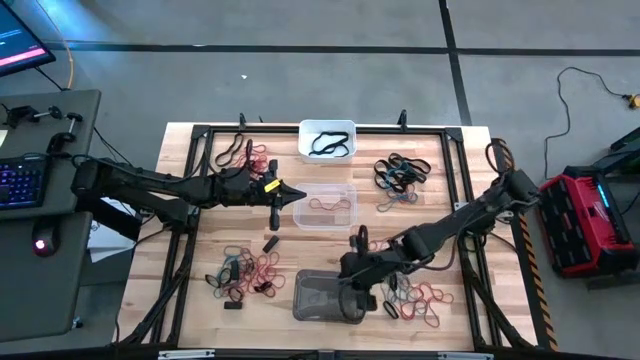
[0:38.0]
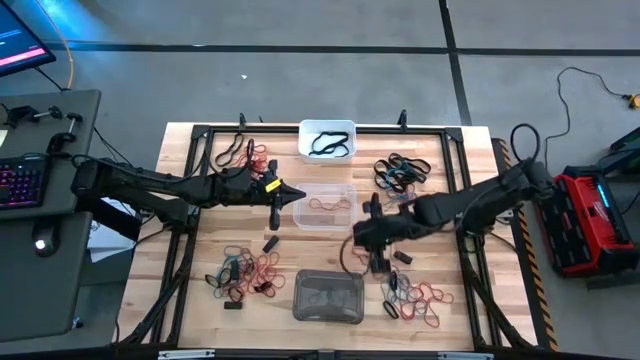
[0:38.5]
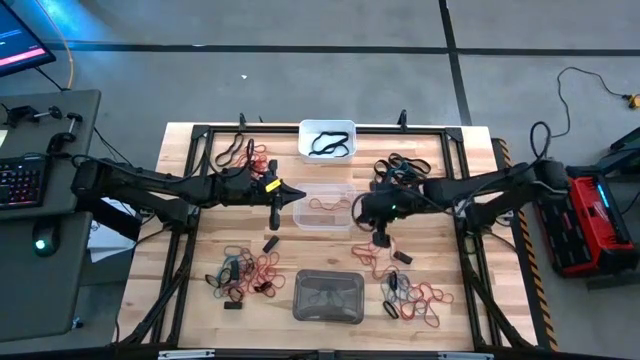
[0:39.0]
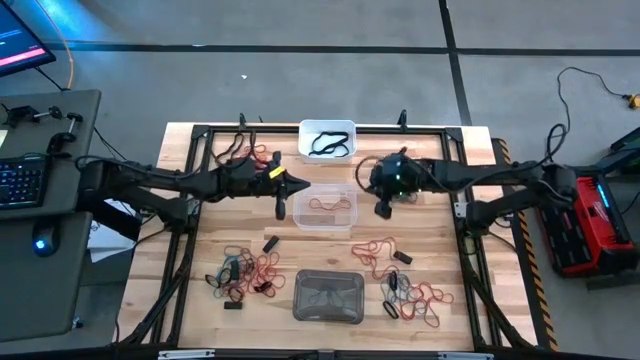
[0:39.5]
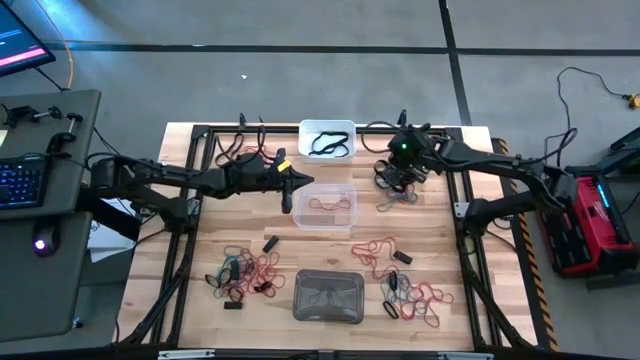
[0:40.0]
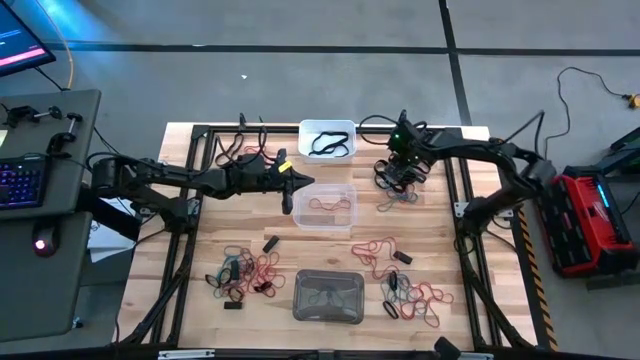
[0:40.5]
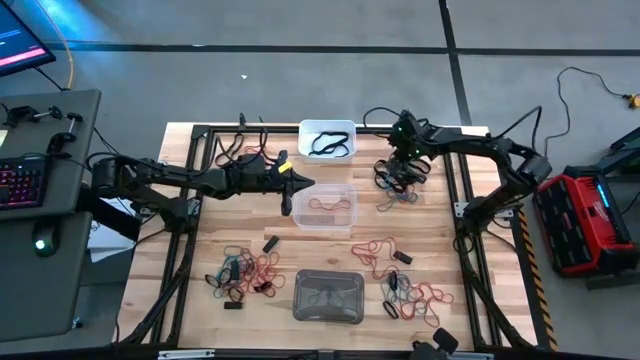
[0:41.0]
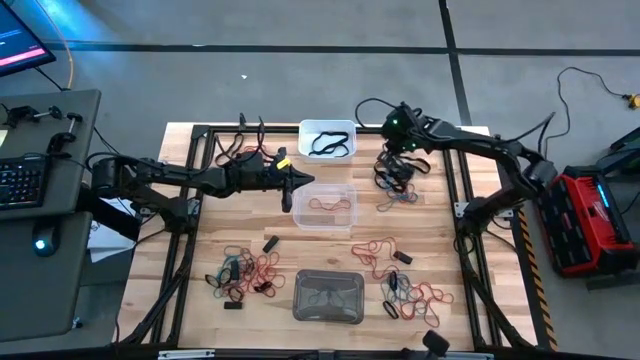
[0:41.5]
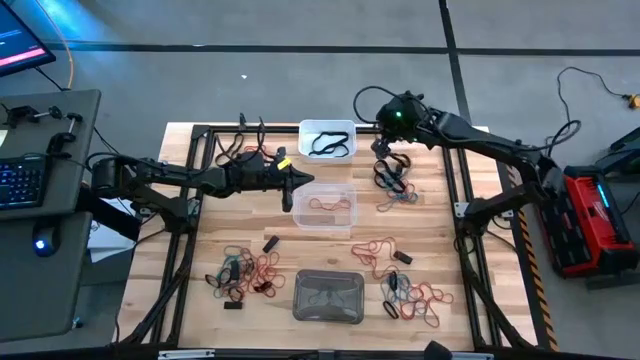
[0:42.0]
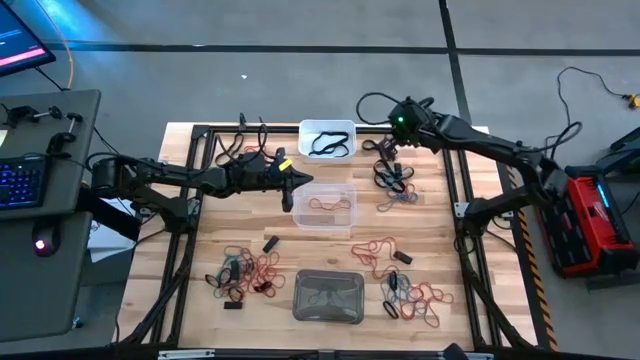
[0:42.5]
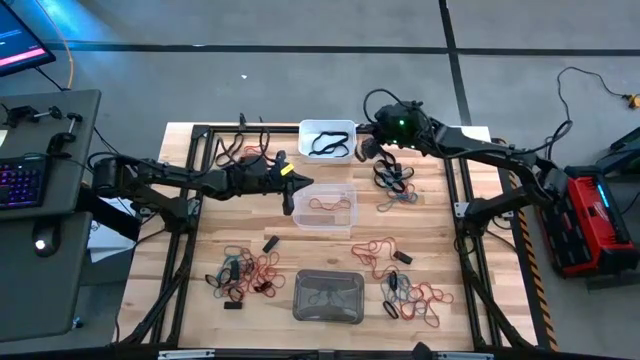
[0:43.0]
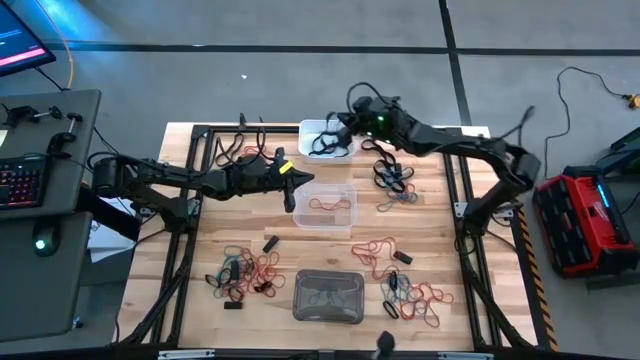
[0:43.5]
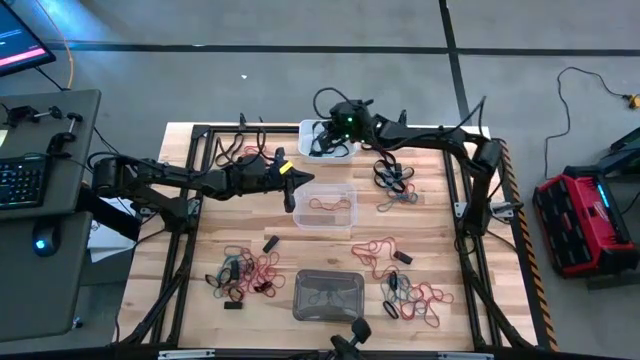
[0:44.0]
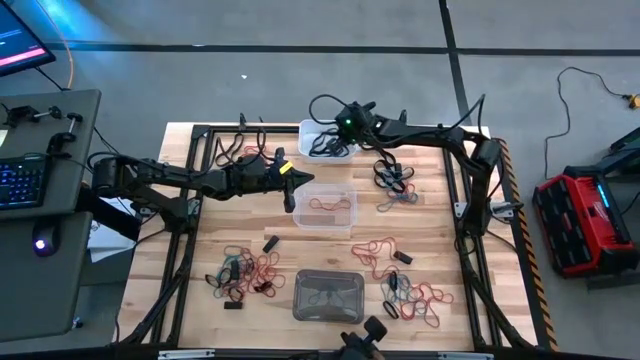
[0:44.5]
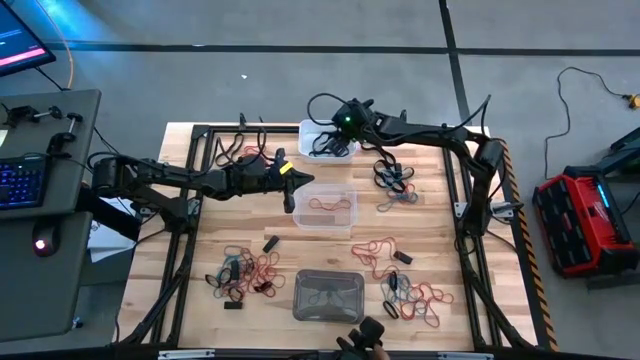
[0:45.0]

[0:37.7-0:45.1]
Task: Sort rubber bands into baskets
Put the black rubber band into the white bin

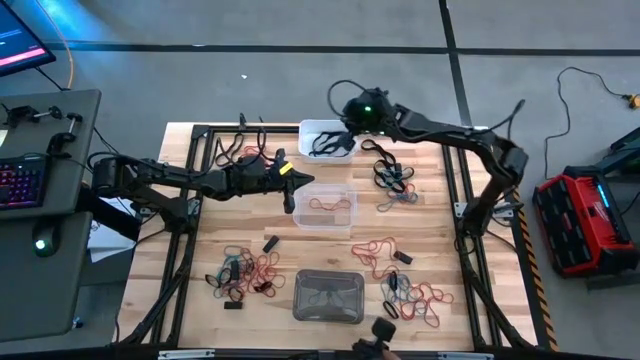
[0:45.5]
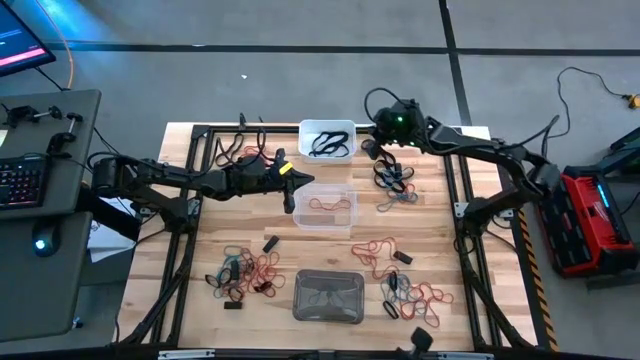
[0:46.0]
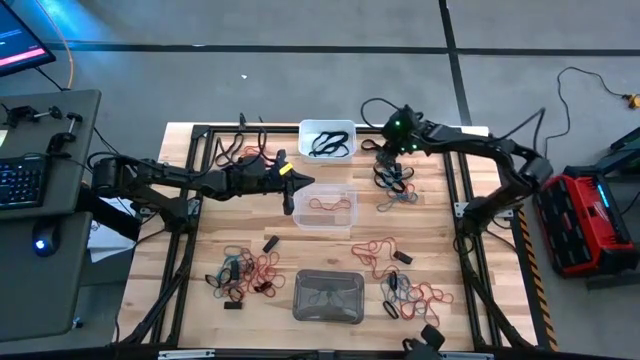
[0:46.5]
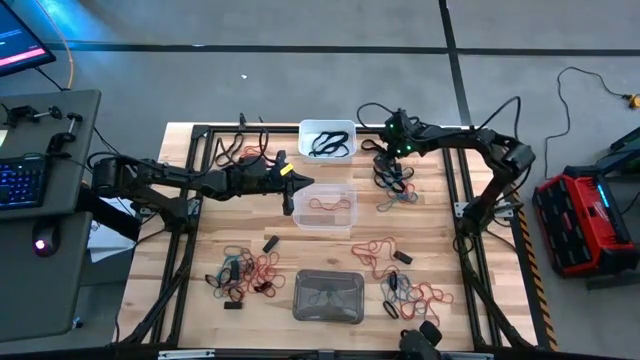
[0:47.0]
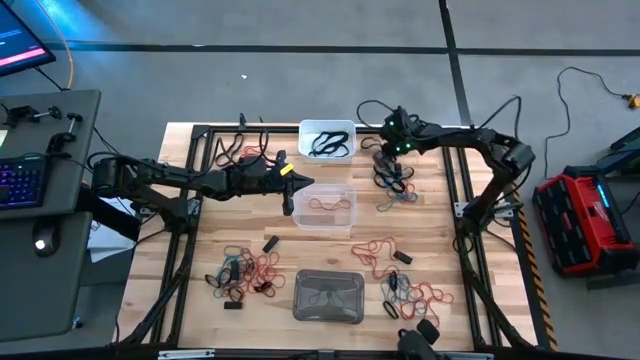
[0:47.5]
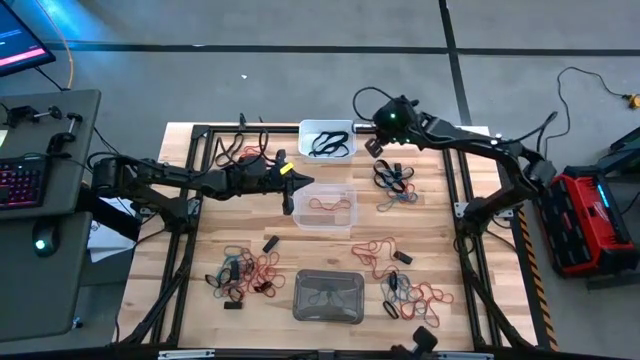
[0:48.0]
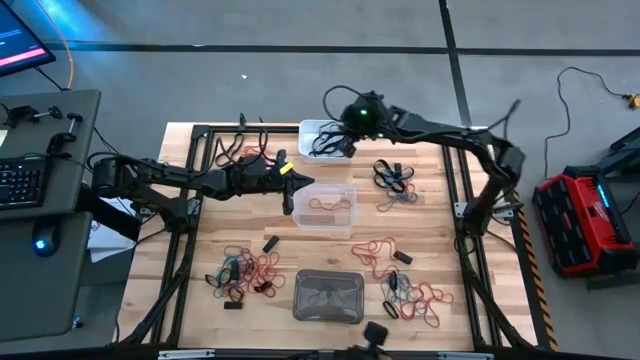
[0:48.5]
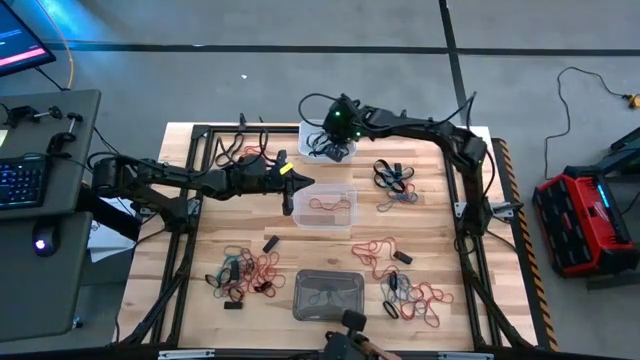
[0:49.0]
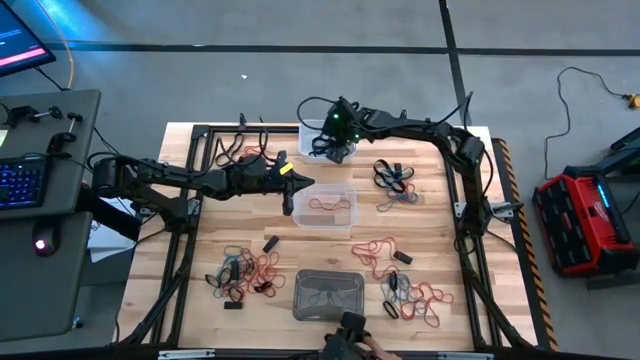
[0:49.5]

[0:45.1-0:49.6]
Put the black rubber band into the white bin

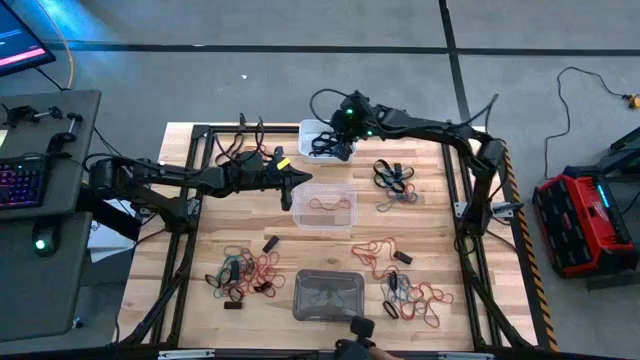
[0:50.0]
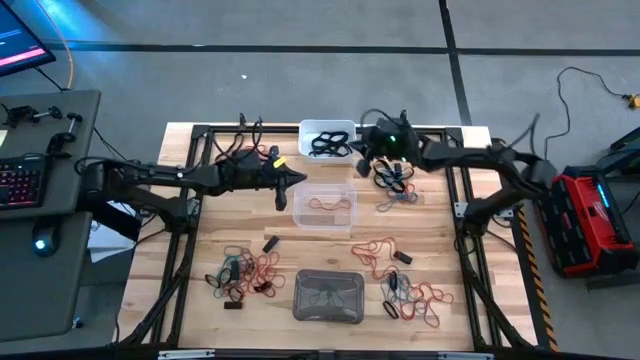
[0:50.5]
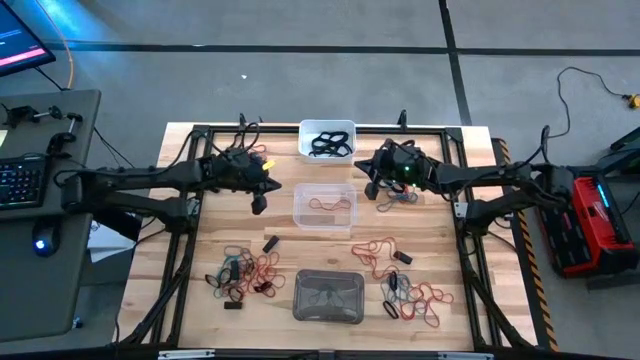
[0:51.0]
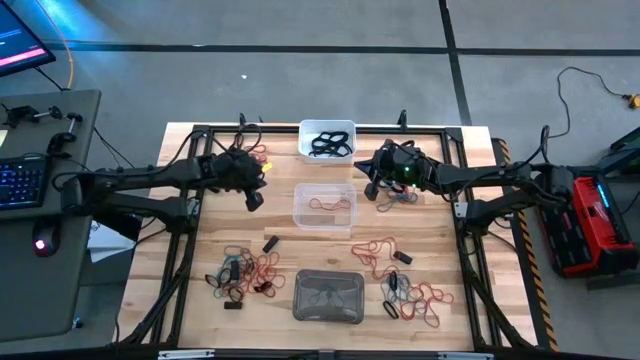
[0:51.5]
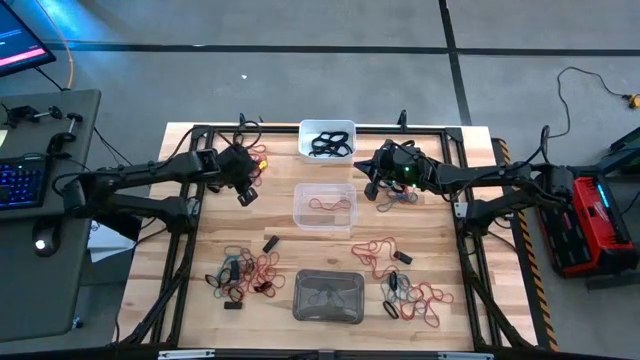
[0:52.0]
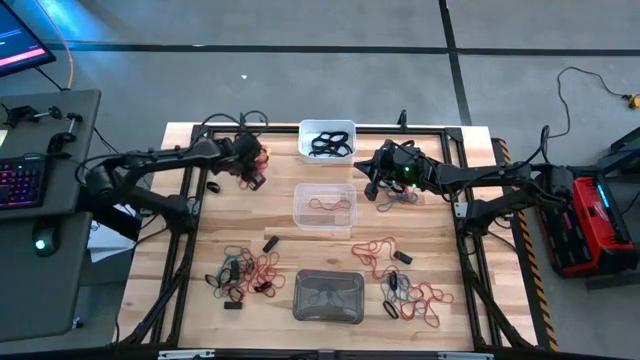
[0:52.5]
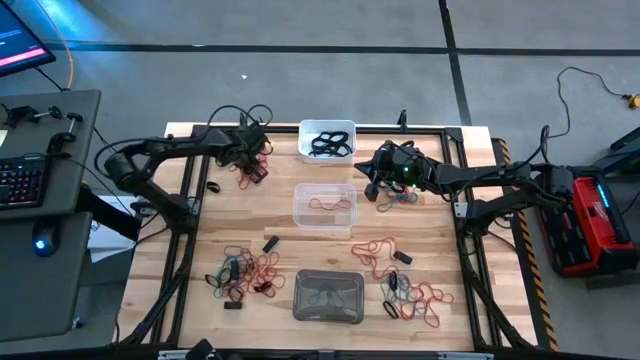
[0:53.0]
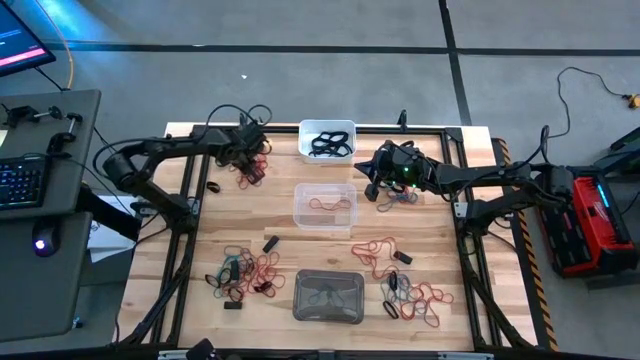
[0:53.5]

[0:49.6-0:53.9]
Put the black rubber band into the white bin

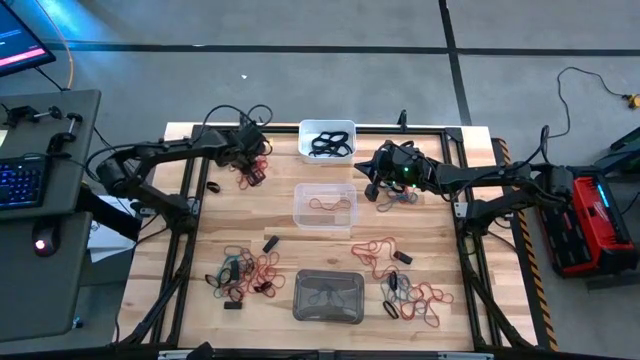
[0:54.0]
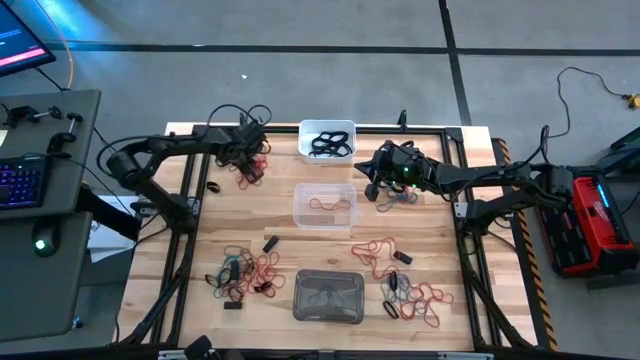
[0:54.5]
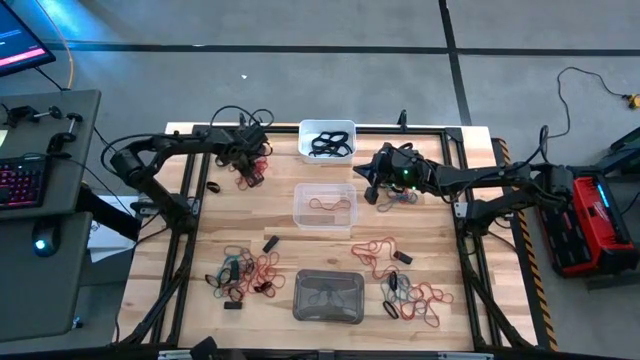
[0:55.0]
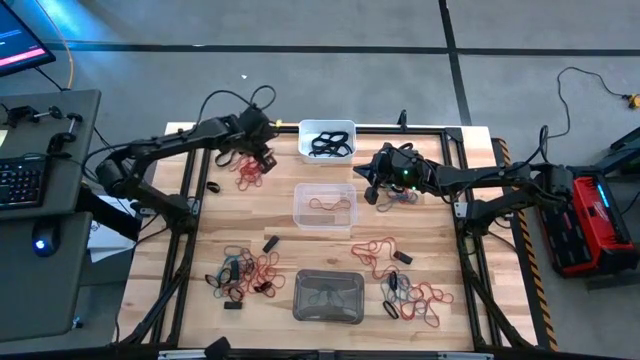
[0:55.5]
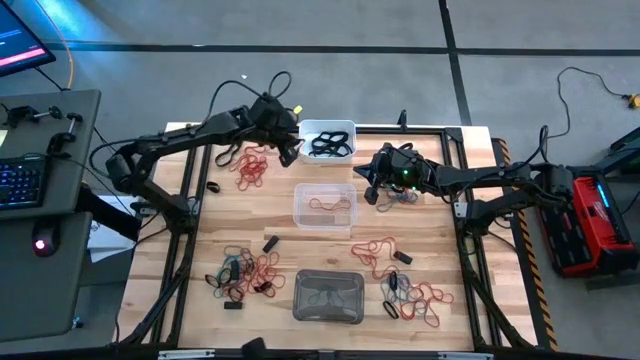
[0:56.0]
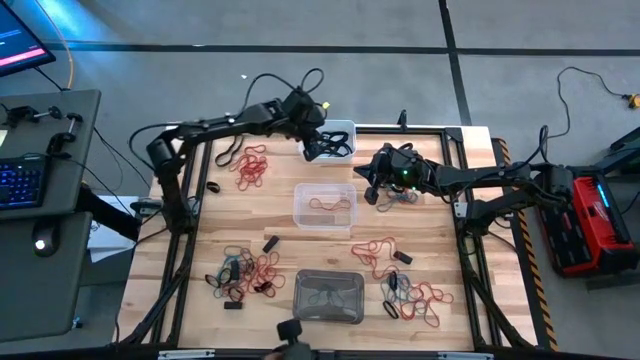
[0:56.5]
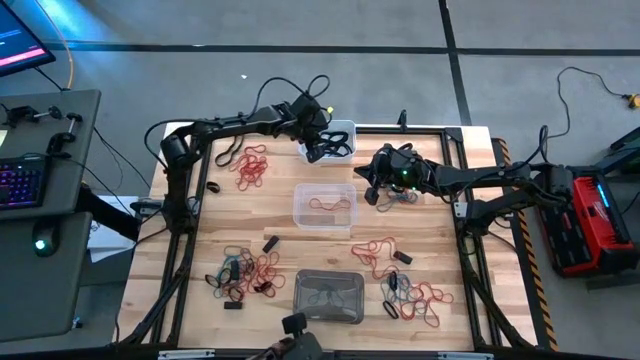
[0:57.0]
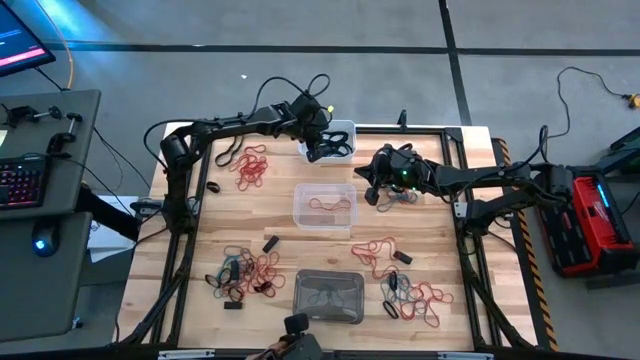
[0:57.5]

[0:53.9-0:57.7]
Put the black rubber band into the white bin
